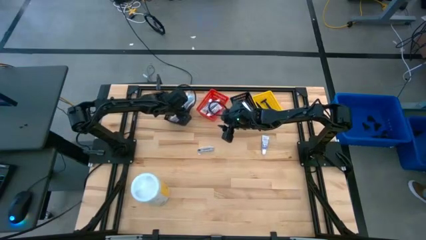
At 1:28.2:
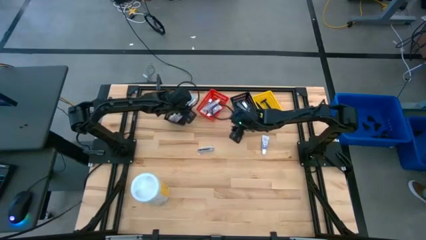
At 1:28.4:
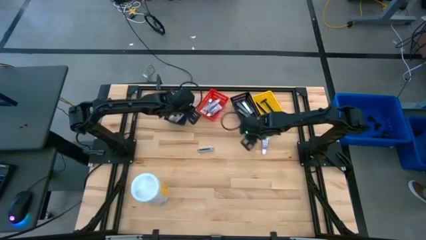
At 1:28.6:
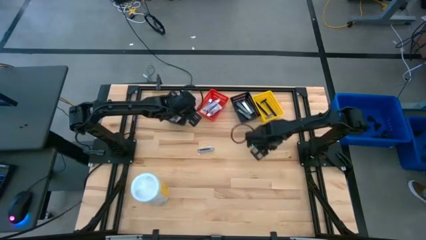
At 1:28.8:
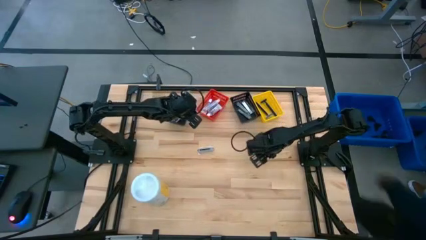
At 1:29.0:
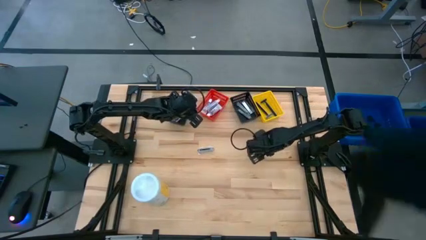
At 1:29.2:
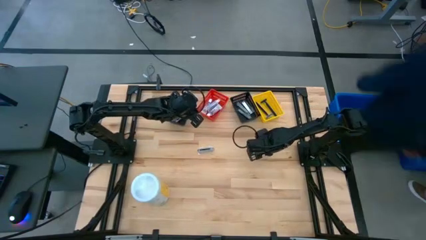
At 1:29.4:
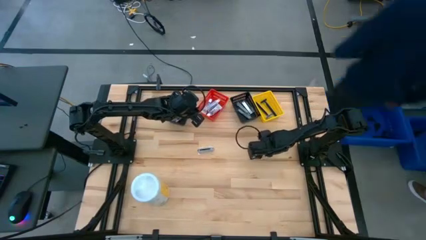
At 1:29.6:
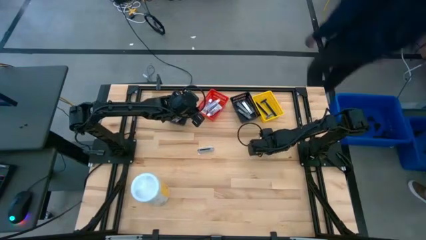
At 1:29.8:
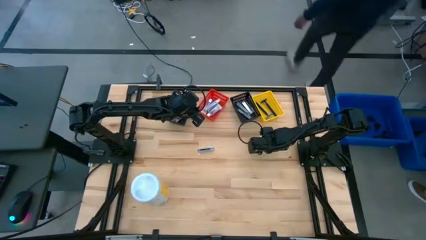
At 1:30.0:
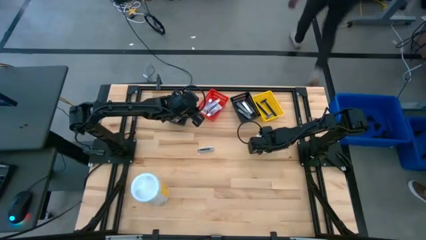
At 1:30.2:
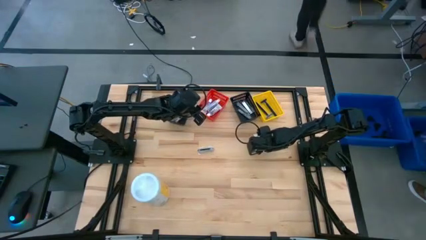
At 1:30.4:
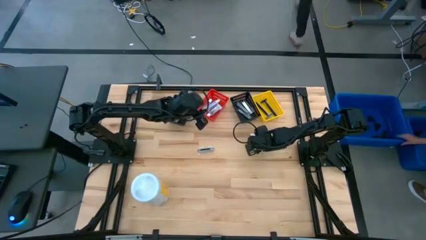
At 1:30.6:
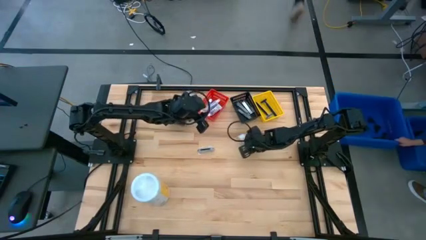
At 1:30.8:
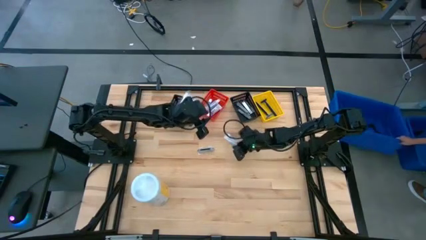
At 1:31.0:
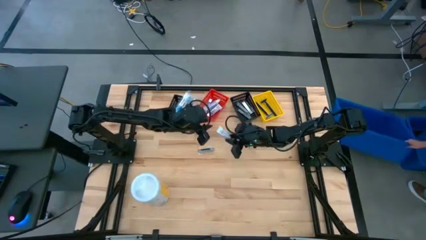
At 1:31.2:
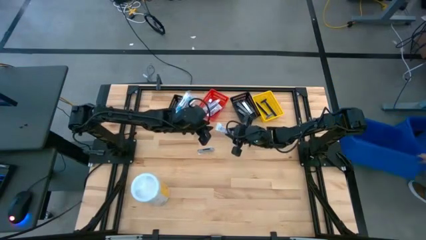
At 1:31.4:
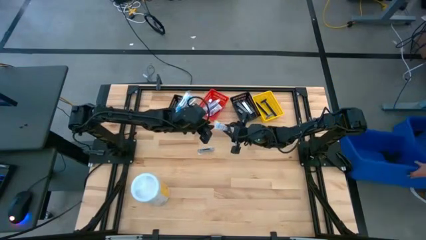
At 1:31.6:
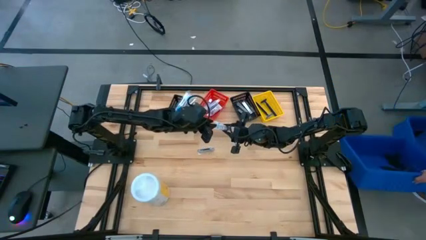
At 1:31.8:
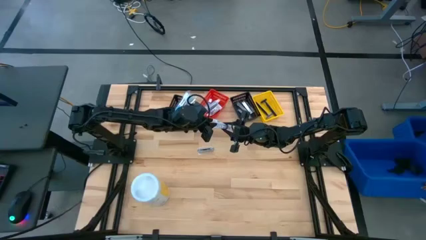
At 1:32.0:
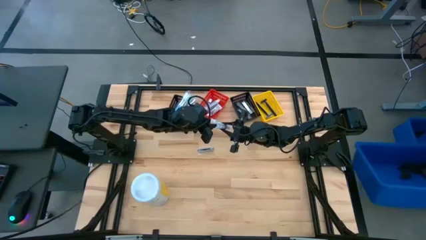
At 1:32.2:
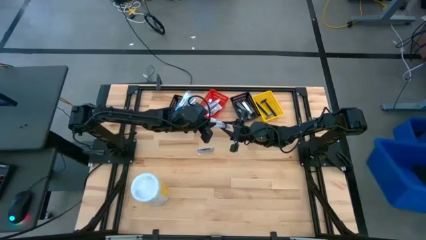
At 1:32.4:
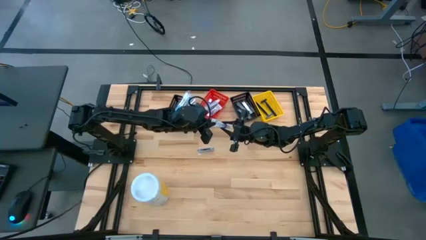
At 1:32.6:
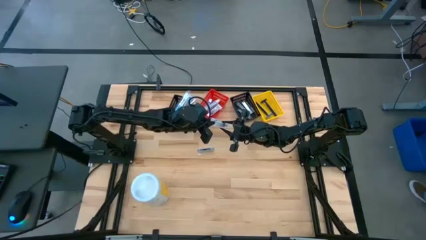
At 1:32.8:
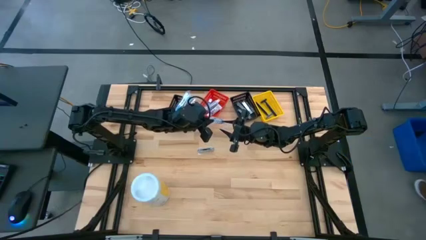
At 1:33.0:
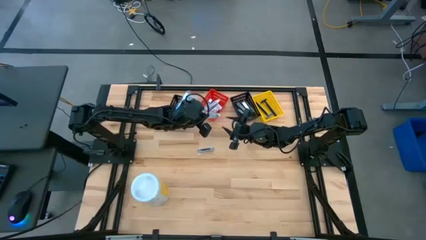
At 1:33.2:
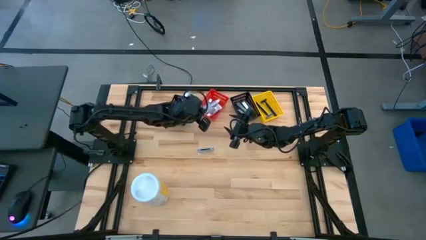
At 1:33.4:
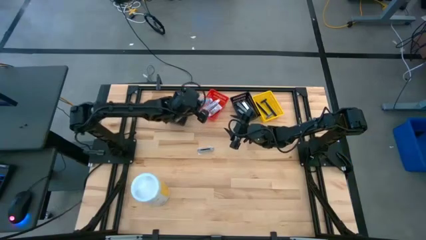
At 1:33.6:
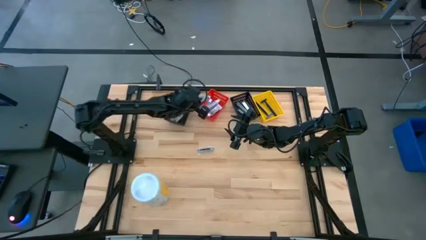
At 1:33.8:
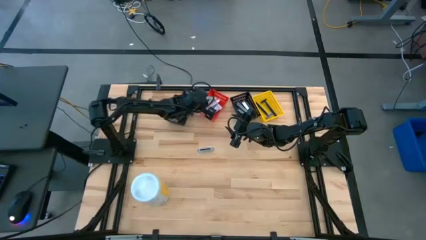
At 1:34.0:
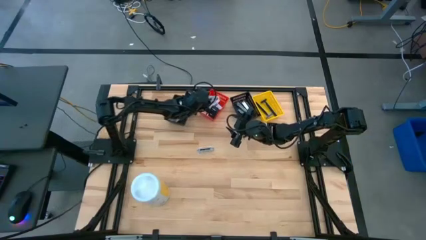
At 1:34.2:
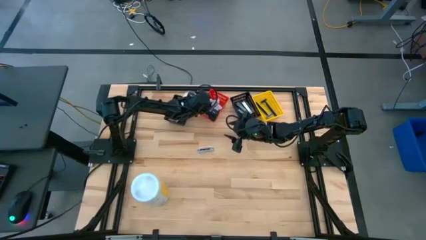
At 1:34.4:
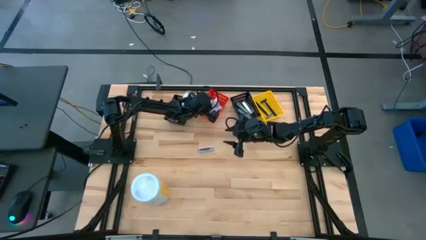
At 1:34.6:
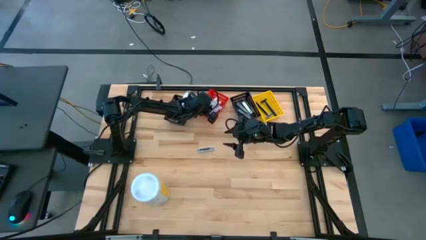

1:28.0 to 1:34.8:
Task: Pick & Place Travel size toiletries
Put the toothpaste into the red bin

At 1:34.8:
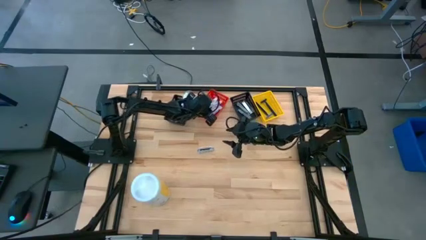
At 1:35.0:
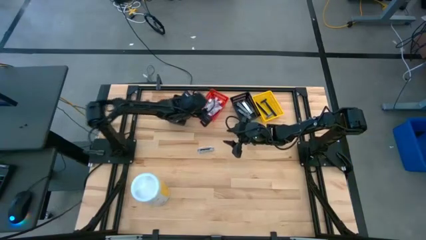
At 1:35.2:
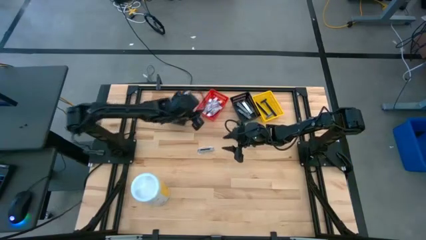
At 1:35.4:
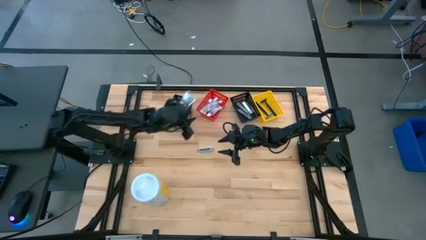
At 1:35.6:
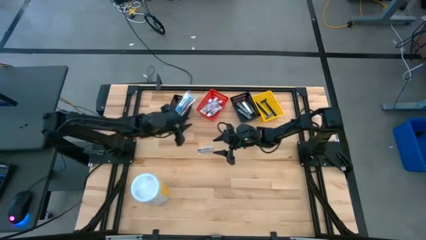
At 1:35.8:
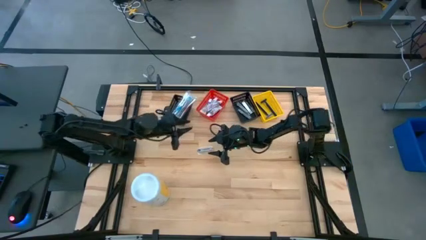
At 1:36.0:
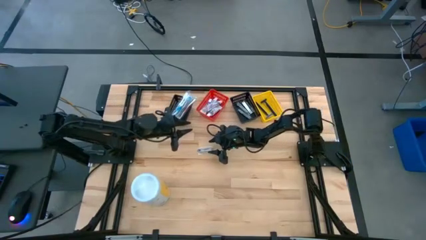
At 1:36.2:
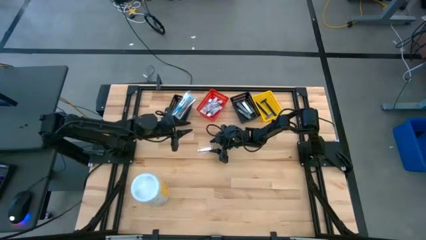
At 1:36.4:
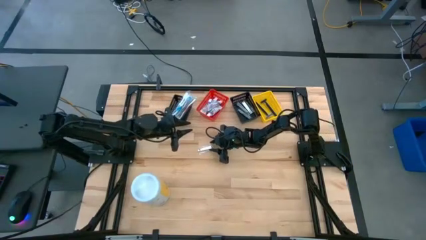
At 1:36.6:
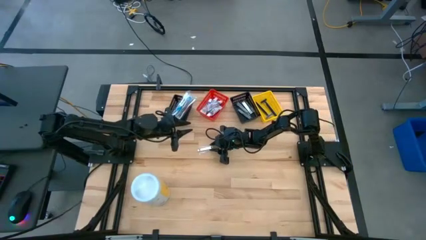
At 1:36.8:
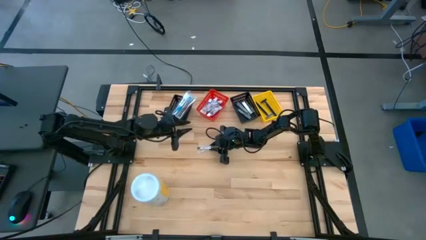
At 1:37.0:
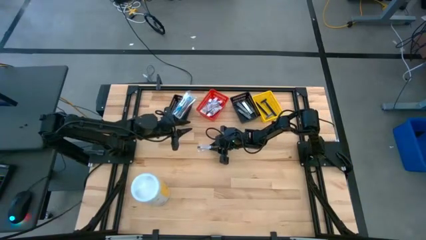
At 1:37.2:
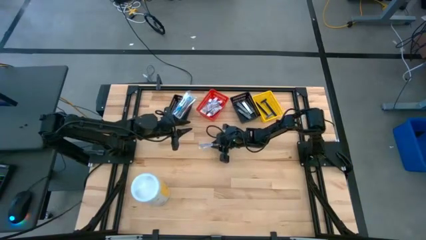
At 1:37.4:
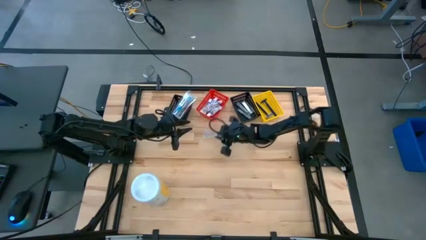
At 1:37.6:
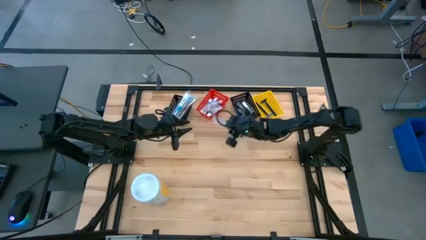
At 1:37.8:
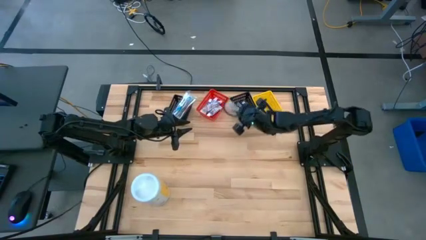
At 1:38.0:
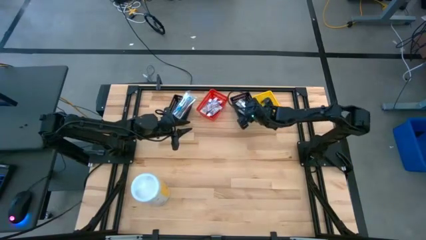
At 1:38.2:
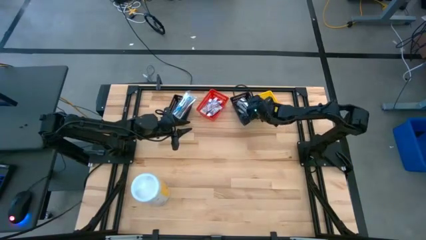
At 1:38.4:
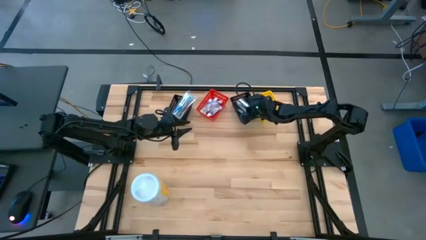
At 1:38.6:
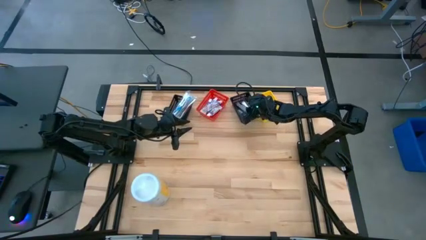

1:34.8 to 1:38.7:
Put the nail cutter into the right black bin

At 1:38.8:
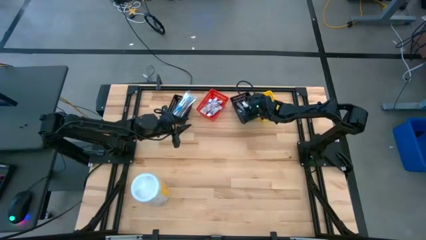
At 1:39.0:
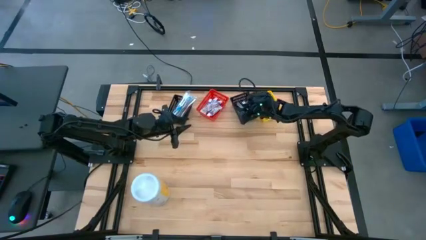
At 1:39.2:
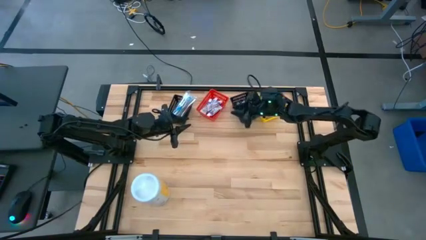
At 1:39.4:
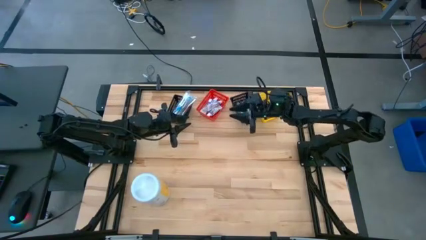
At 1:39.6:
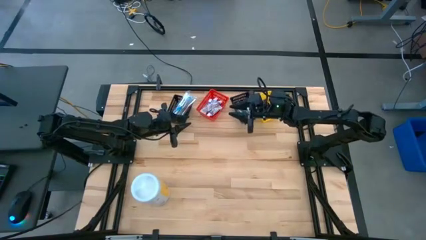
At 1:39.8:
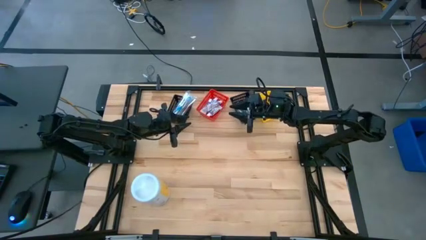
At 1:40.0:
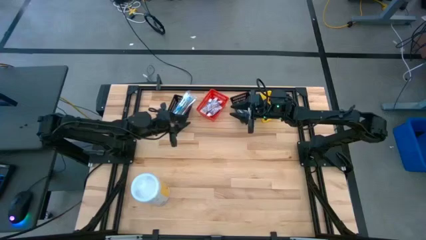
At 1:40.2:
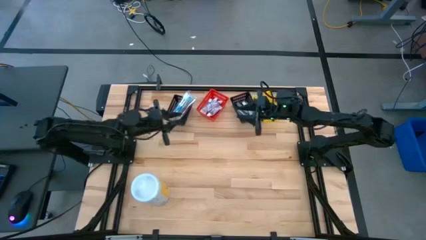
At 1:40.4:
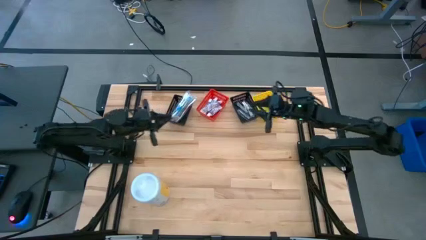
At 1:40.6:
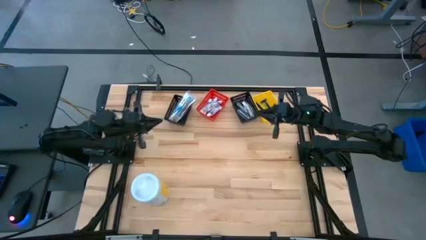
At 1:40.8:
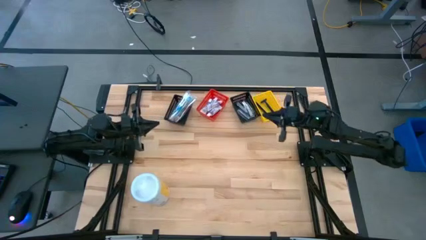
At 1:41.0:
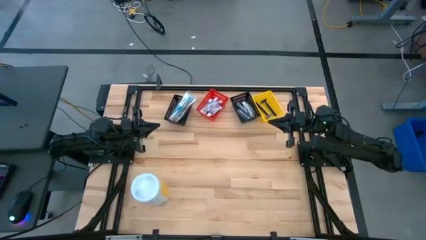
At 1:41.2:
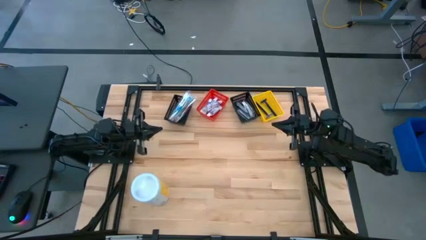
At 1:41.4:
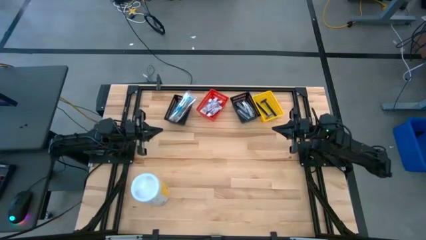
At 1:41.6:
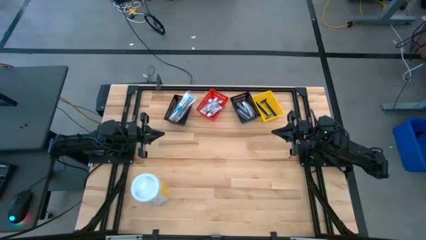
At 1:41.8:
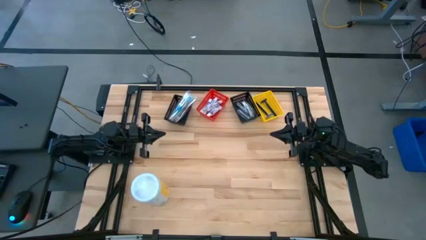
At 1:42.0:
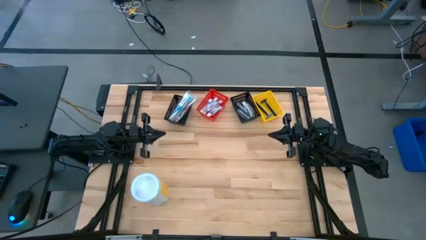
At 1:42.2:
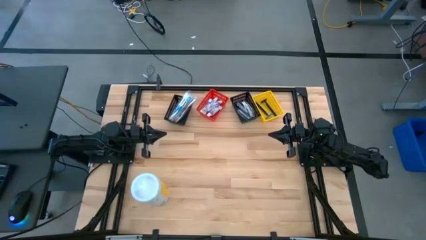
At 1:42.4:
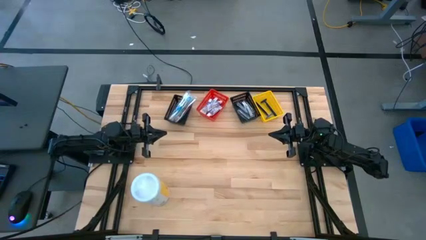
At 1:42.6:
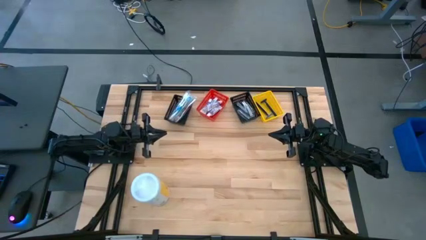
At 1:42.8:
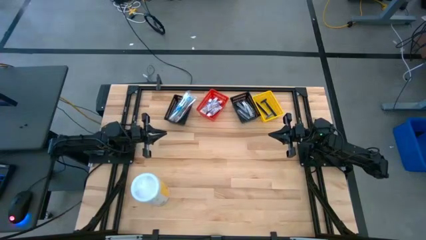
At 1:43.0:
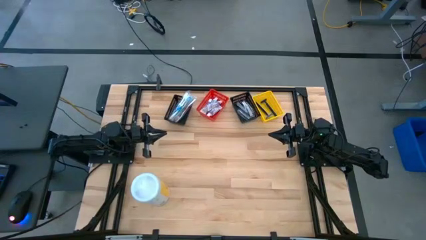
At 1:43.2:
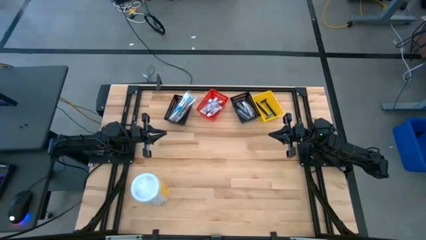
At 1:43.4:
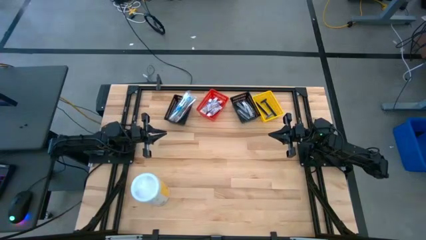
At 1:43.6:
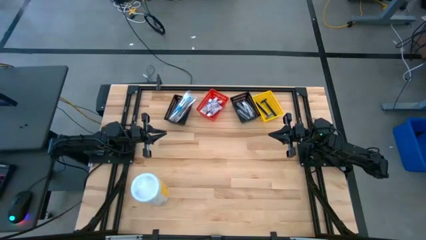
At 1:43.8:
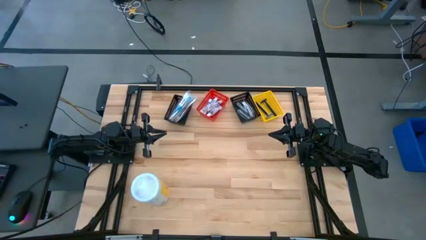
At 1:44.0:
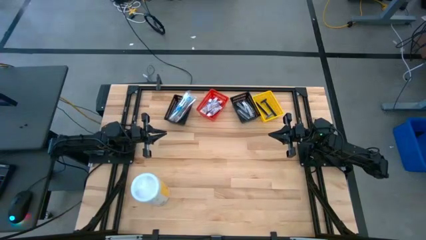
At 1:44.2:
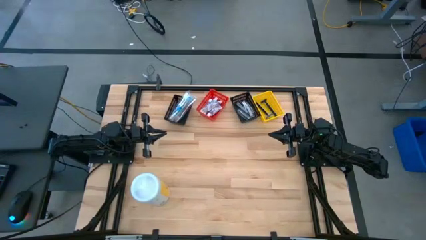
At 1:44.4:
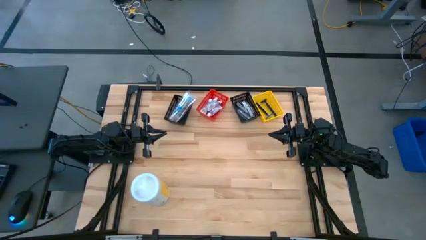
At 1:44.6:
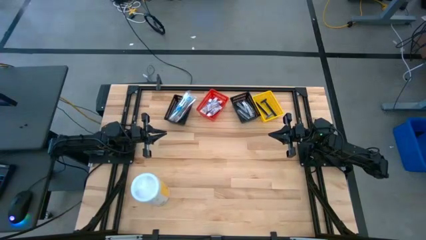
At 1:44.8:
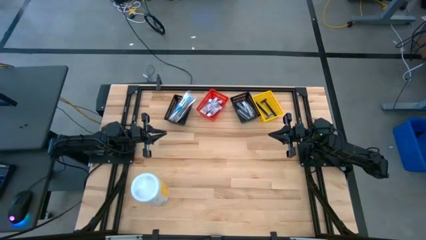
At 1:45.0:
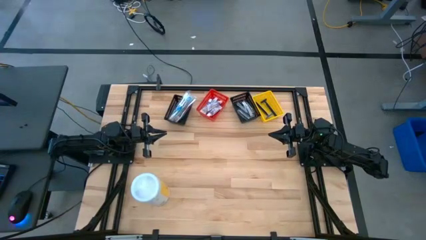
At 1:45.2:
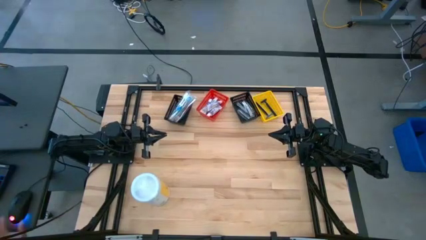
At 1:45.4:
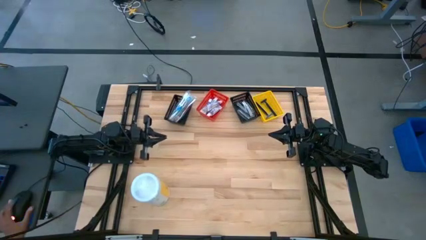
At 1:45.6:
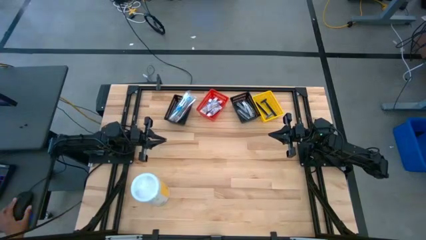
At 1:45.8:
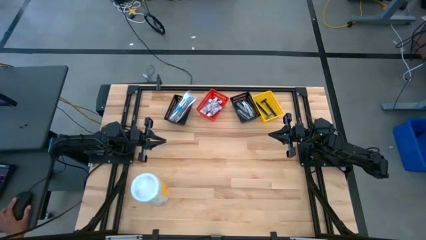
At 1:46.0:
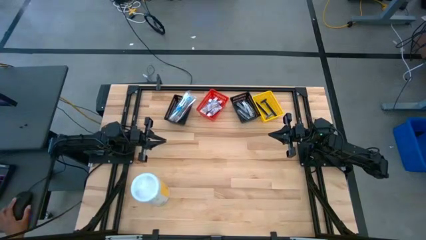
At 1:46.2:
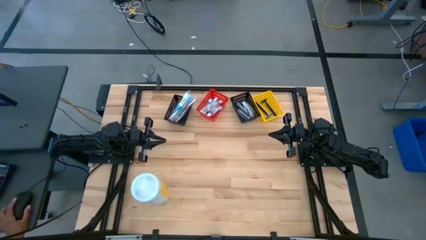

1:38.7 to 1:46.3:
Return to Home Position
